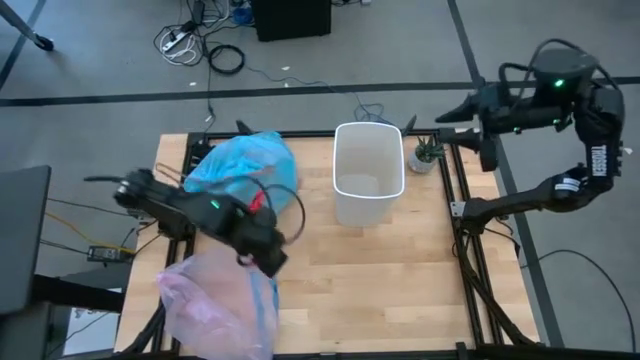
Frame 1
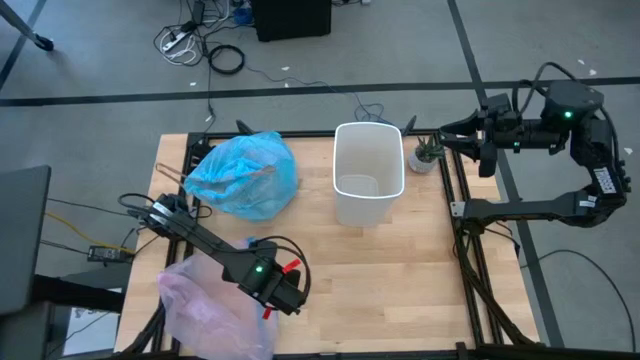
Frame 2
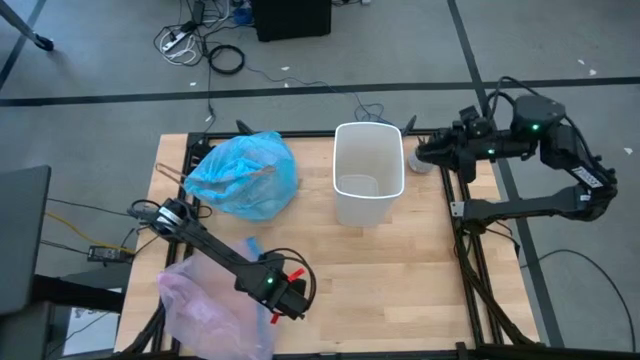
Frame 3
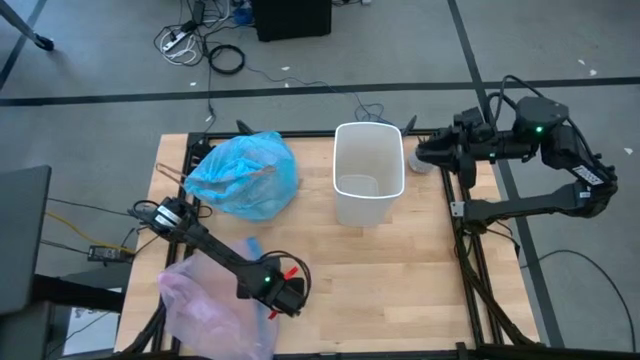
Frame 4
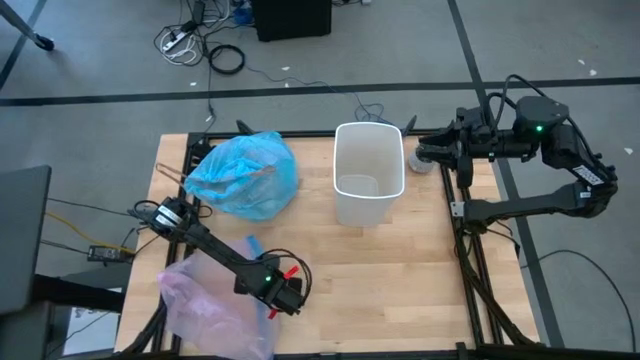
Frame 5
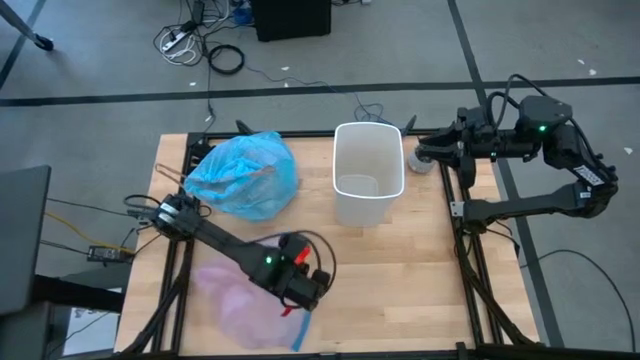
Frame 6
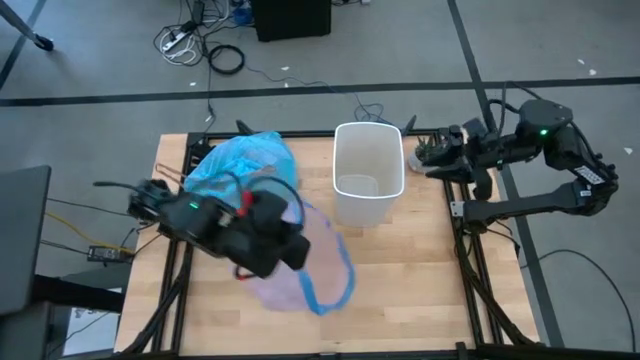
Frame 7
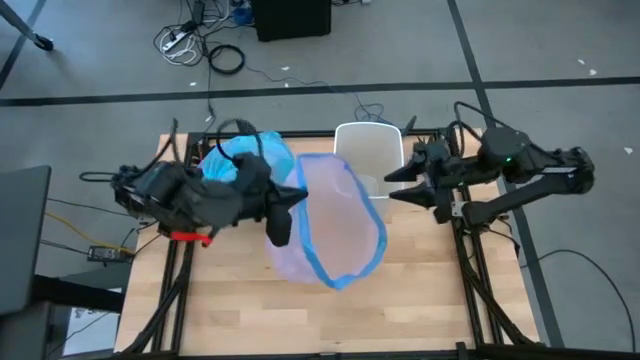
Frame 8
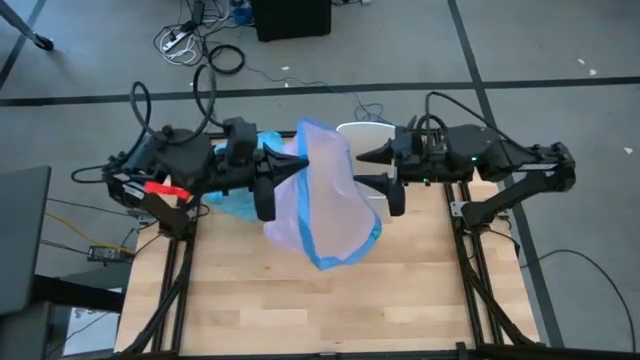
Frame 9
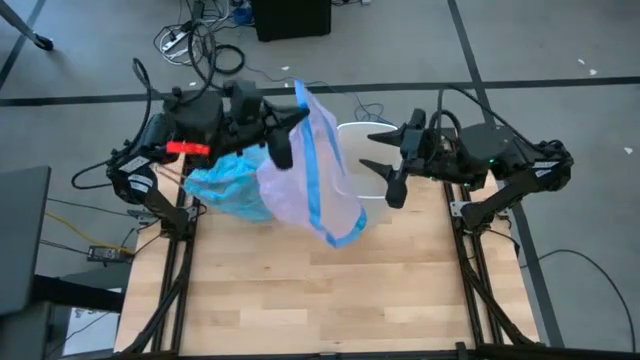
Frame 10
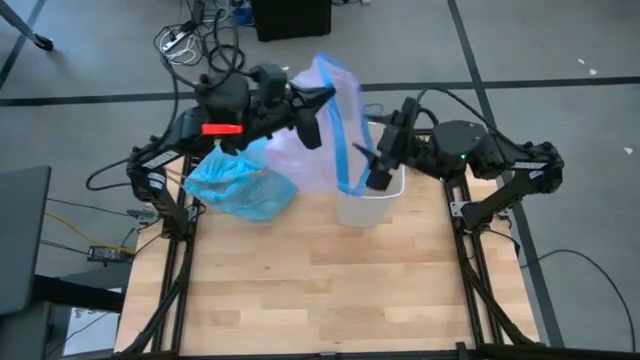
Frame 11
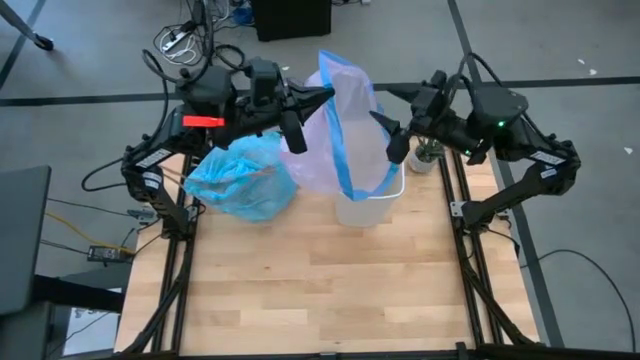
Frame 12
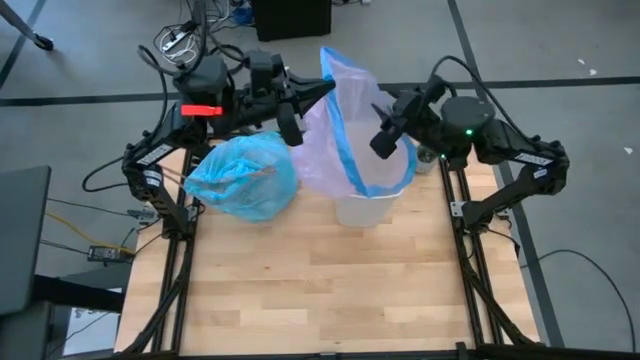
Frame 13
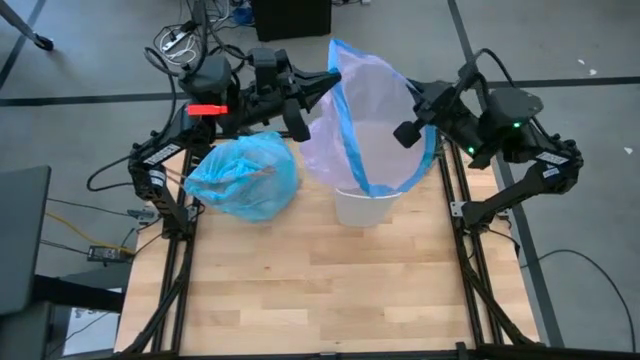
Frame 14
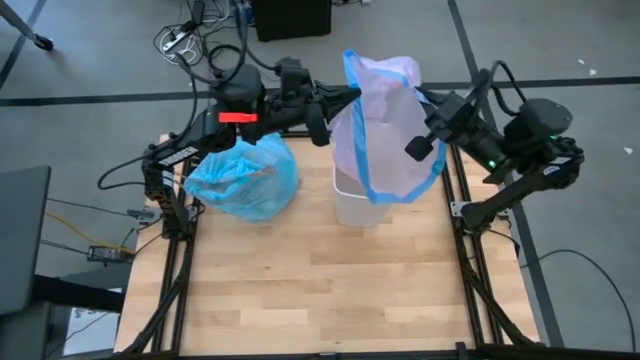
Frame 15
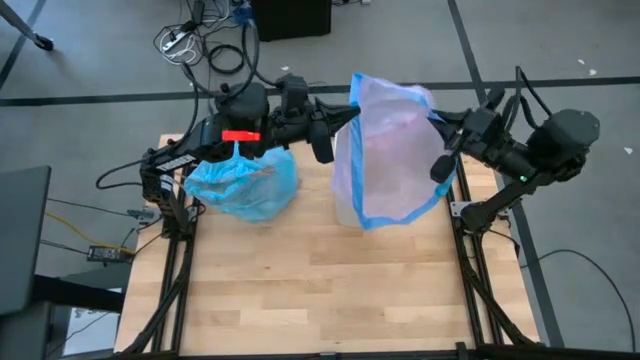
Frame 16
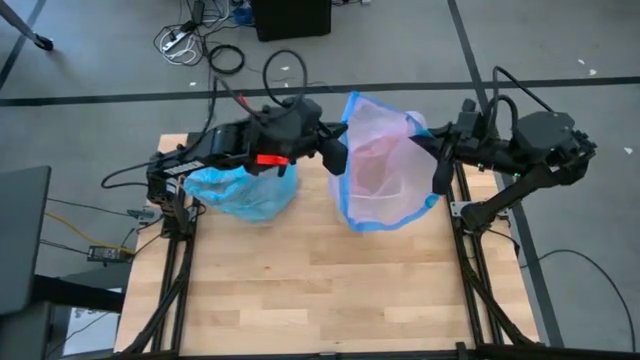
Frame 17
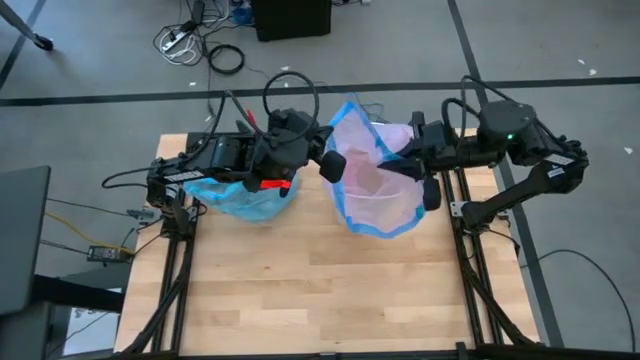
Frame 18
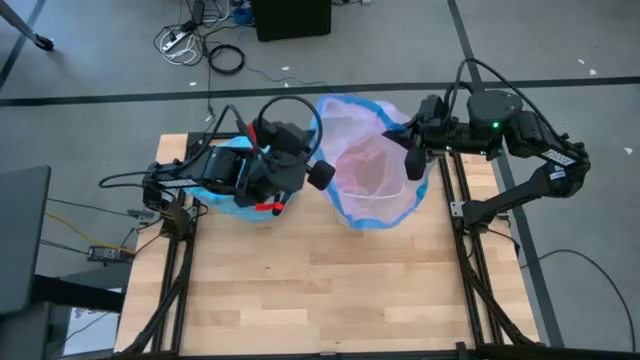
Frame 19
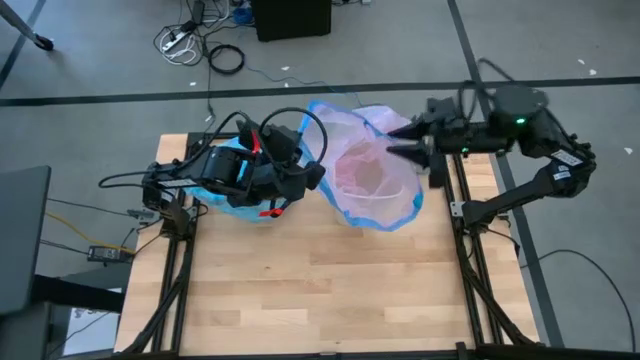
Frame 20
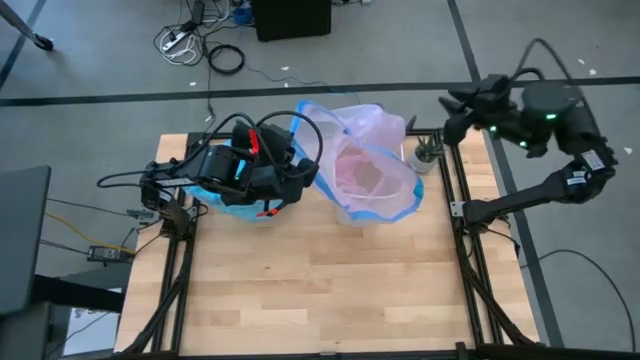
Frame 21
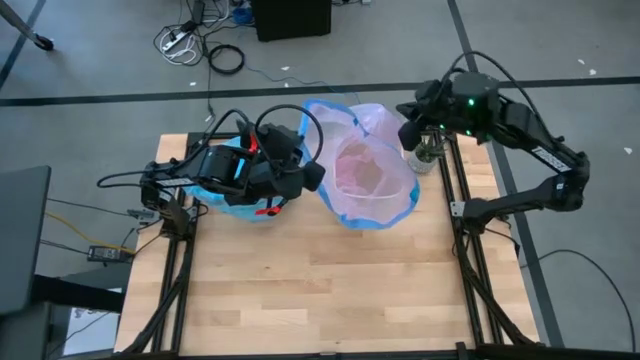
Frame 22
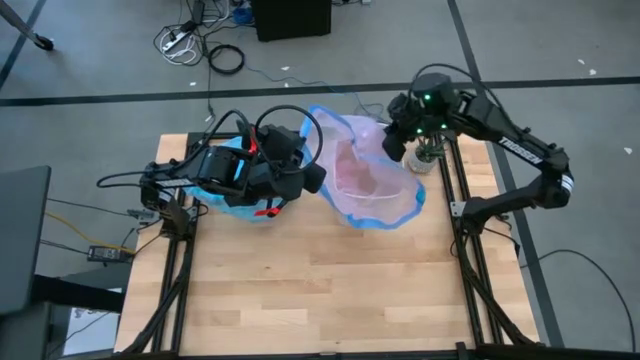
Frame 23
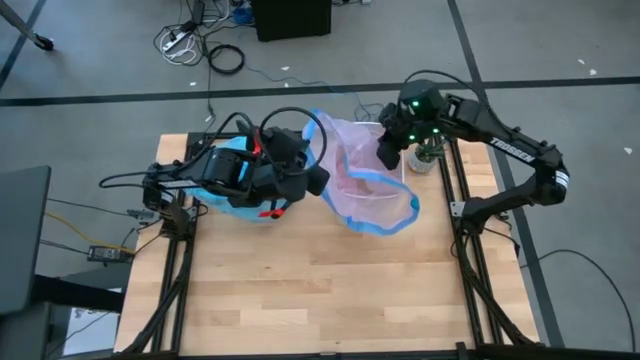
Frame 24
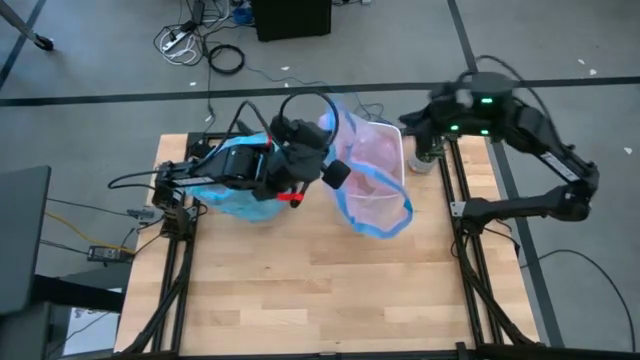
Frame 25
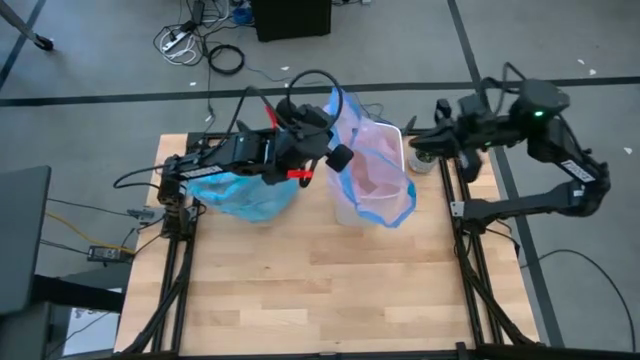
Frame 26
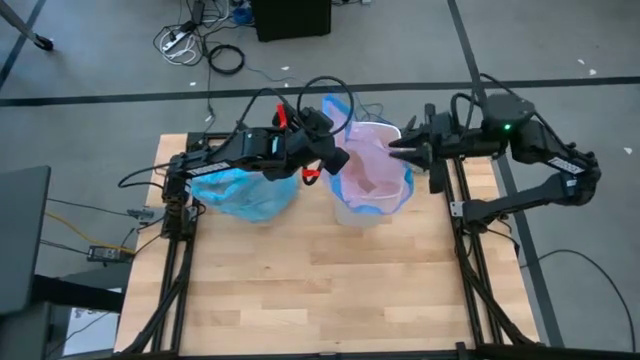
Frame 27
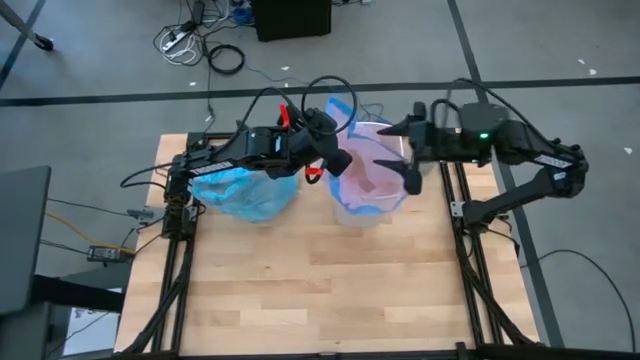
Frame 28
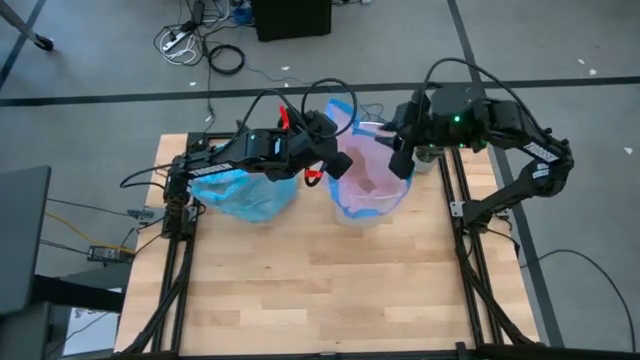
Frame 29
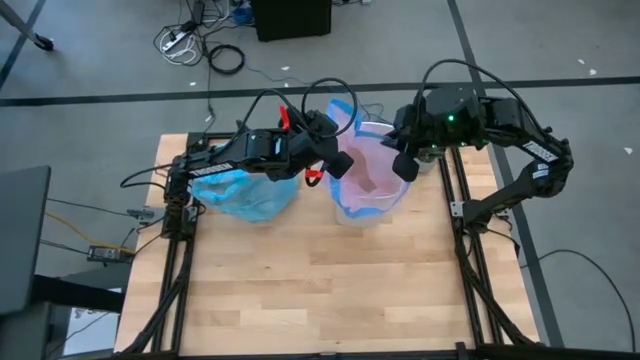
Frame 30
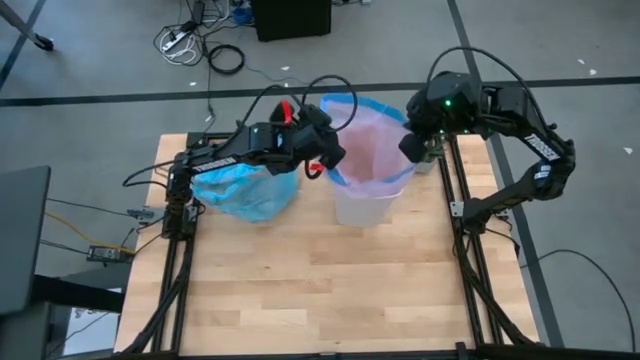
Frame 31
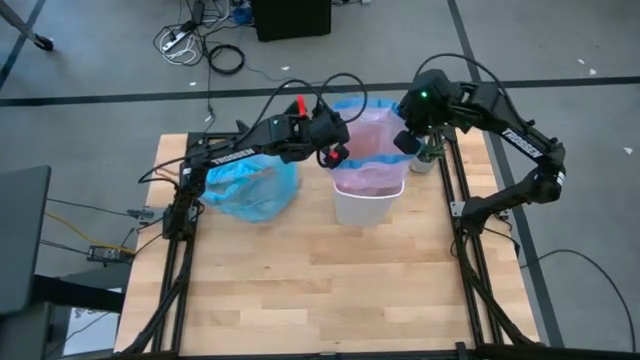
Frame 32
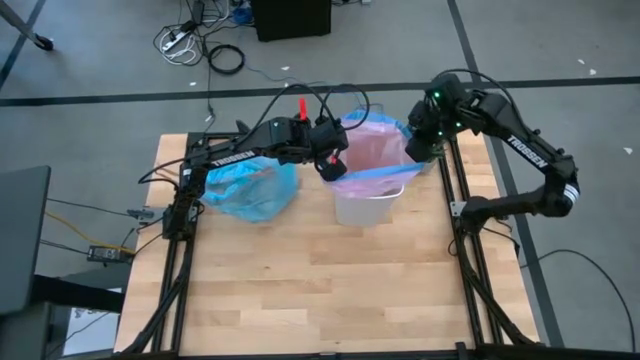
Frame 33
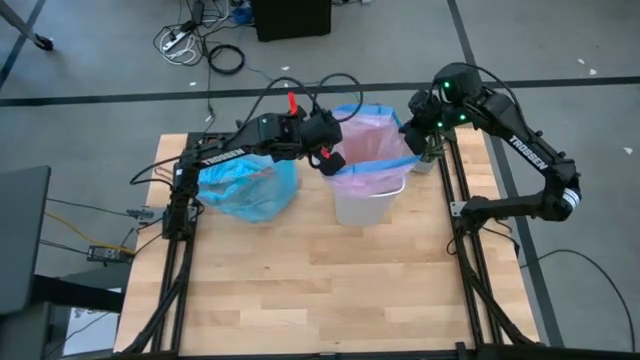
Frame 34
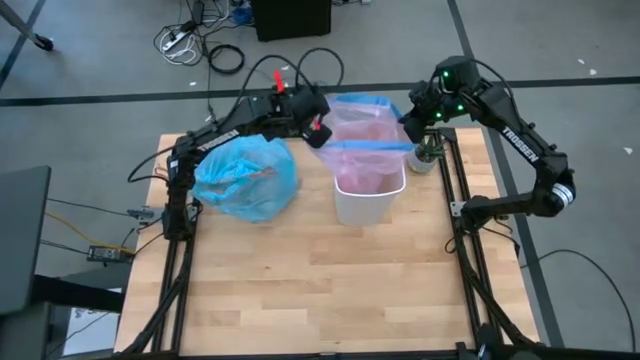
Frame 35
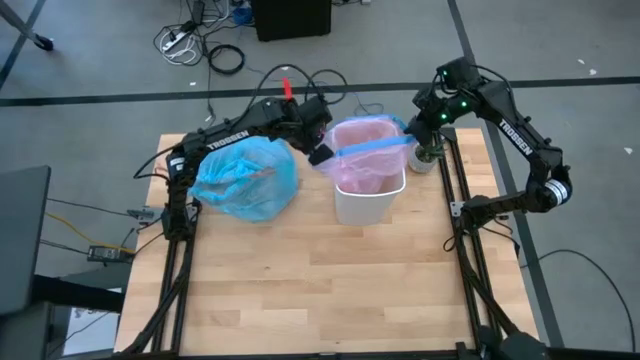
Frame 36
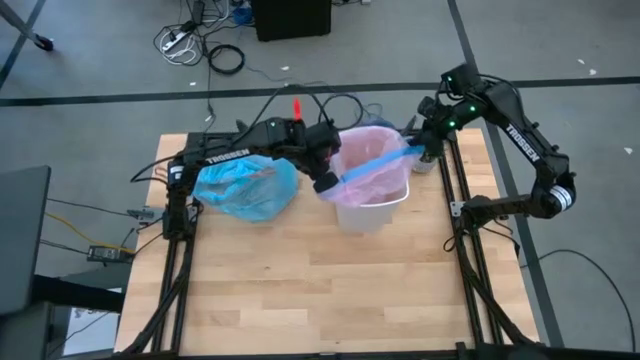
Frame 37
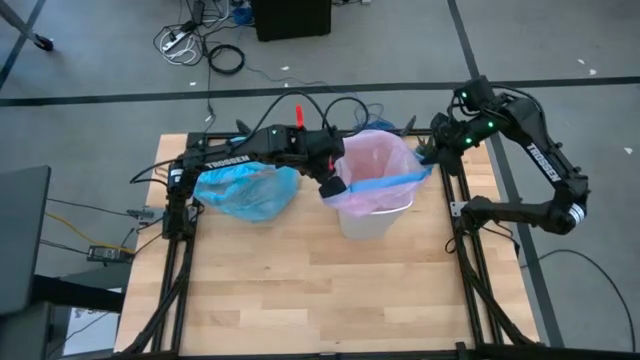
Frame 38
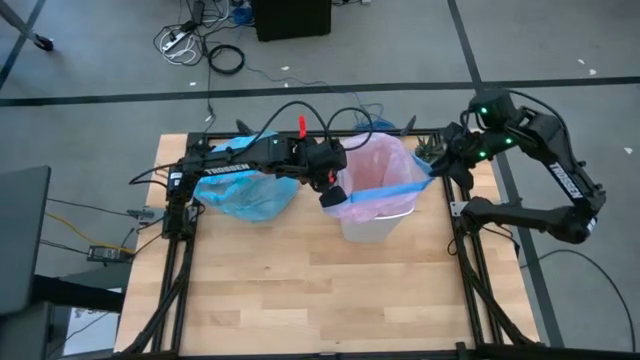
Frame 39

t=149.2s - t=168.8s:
Task: place trash/remove bag and relplace
Put the new trash bag into the trash bin

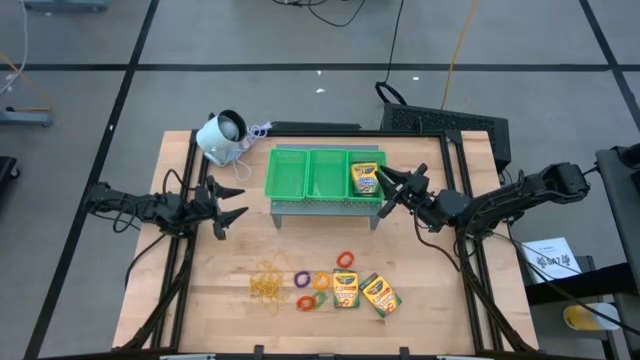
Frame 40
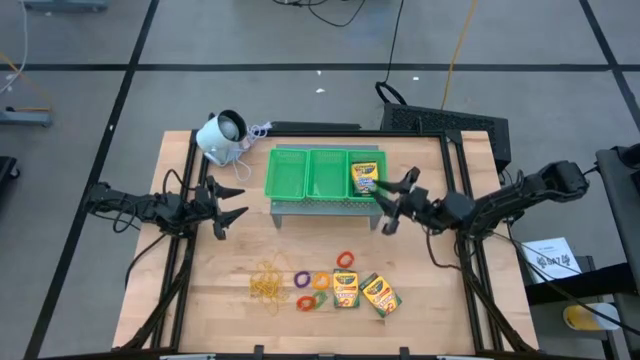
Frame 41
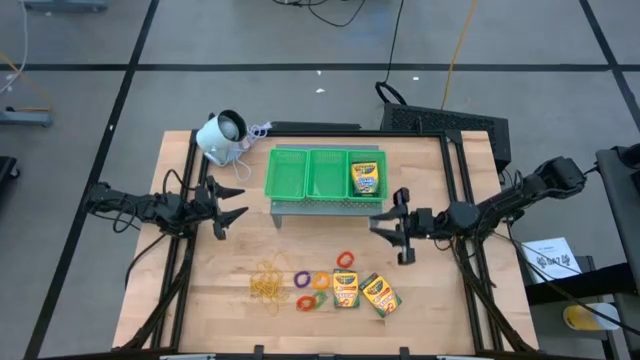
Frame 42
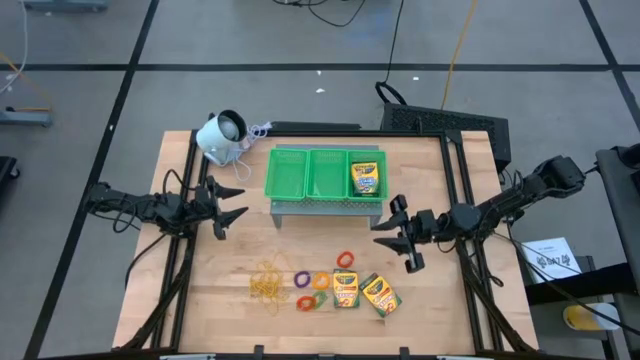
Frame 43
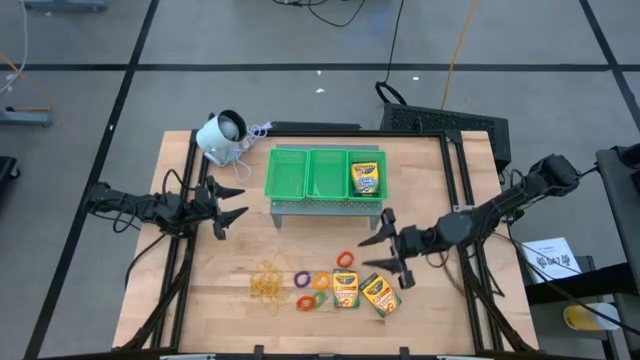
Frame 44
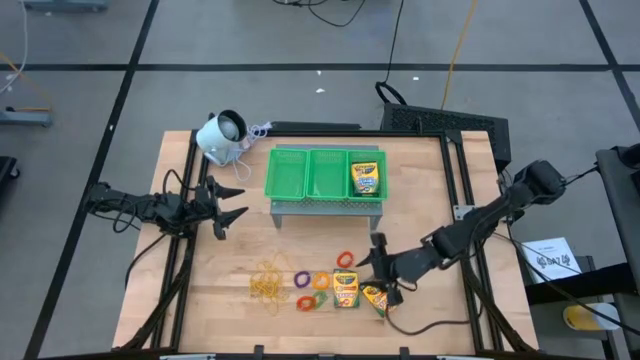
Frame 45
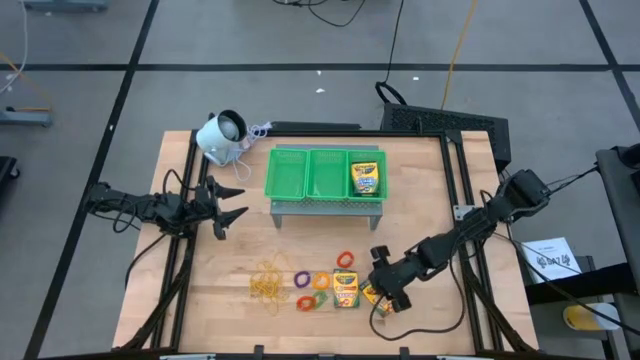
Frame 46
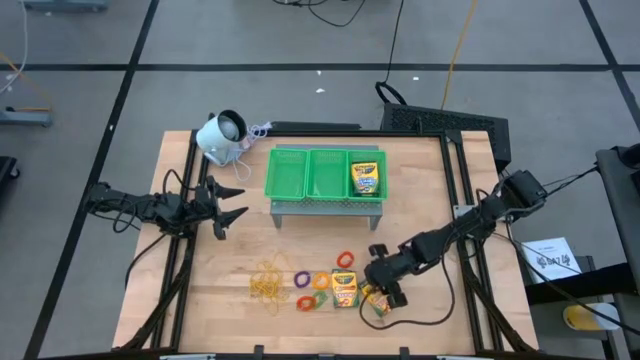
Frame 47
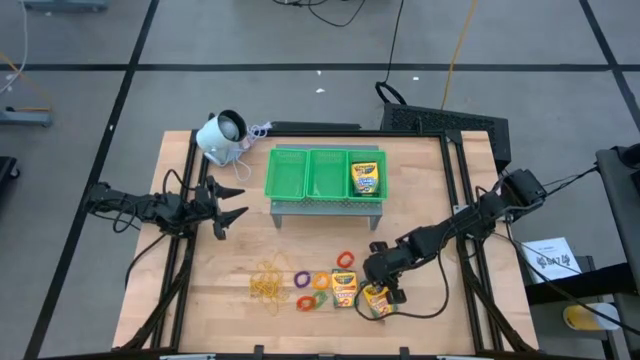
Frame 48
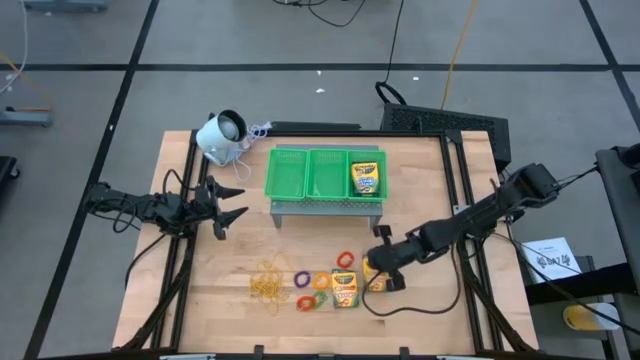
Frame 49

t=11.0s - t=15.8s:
Task: Pick & Place Office Desk Supplies
Stack the right yellow crayon box on the yellow crayon box in the right green basket
